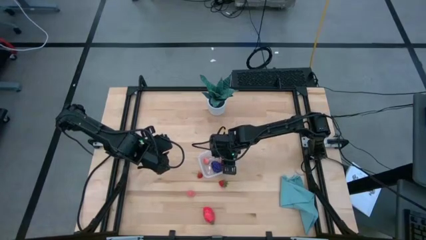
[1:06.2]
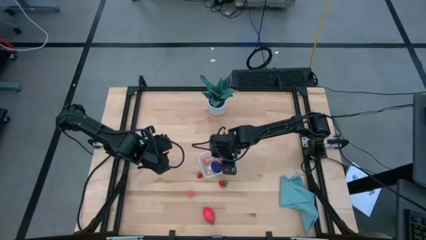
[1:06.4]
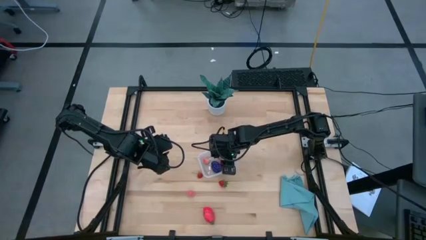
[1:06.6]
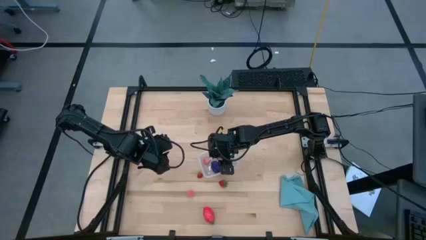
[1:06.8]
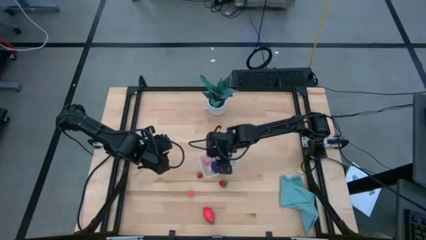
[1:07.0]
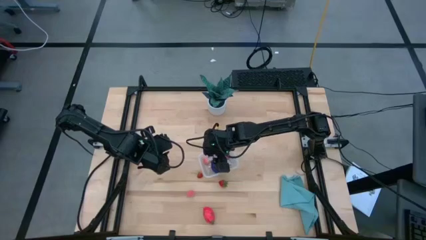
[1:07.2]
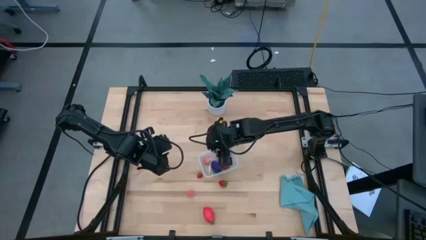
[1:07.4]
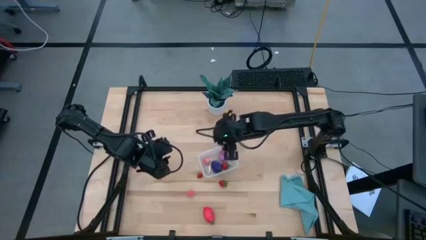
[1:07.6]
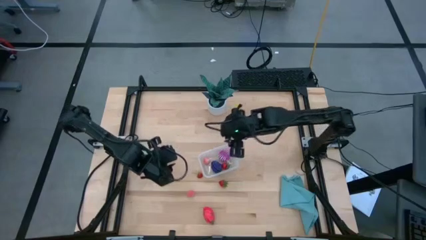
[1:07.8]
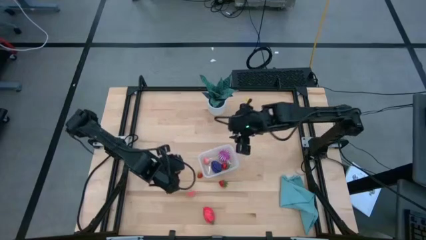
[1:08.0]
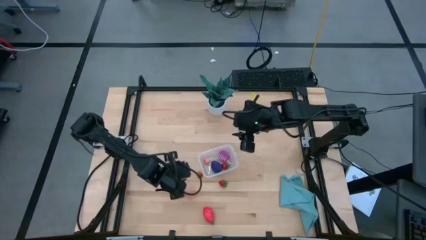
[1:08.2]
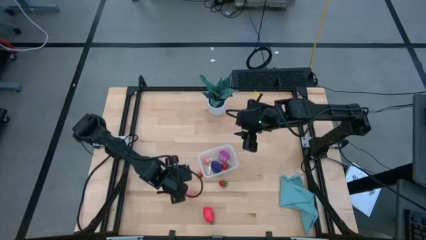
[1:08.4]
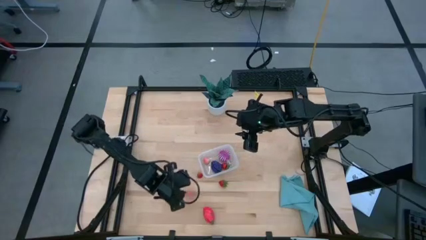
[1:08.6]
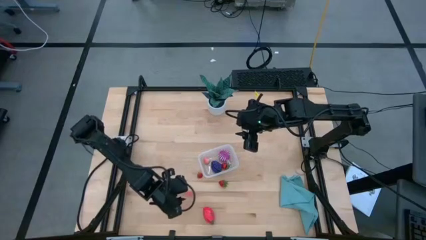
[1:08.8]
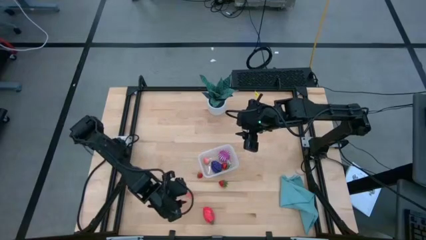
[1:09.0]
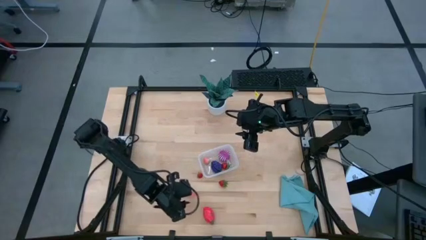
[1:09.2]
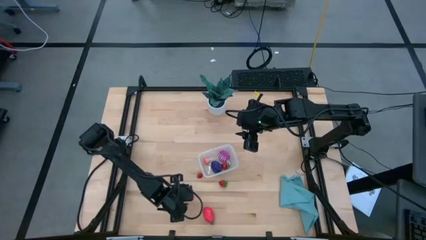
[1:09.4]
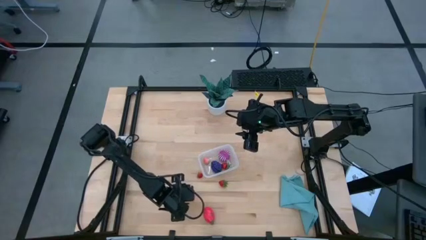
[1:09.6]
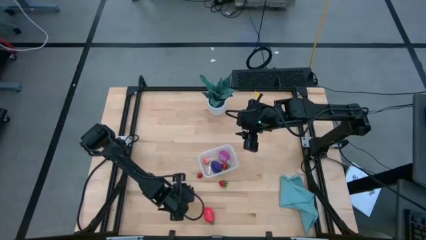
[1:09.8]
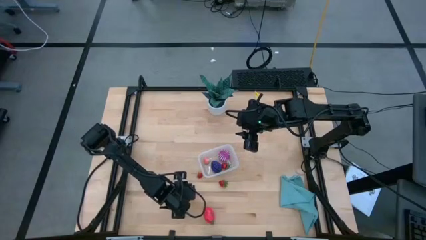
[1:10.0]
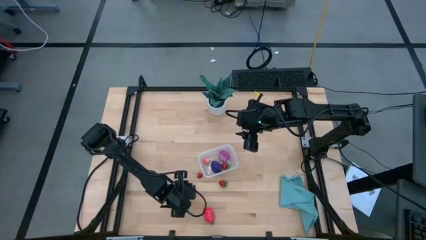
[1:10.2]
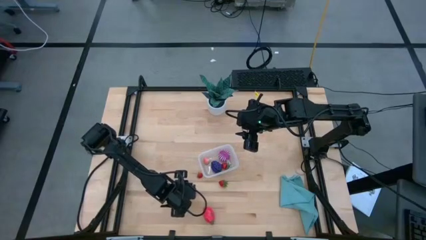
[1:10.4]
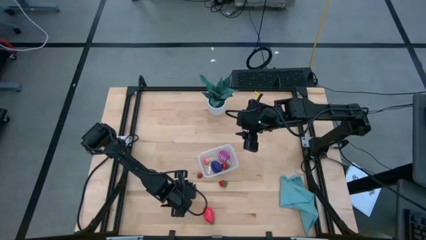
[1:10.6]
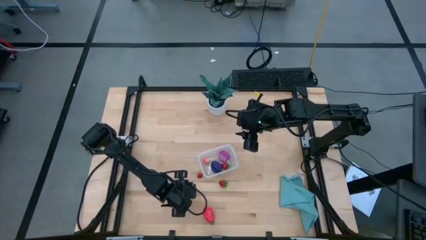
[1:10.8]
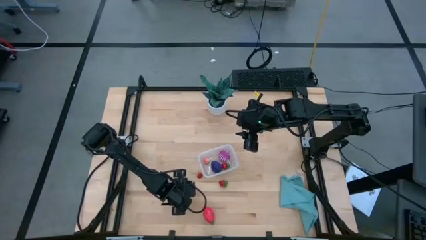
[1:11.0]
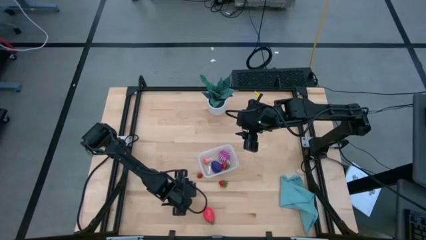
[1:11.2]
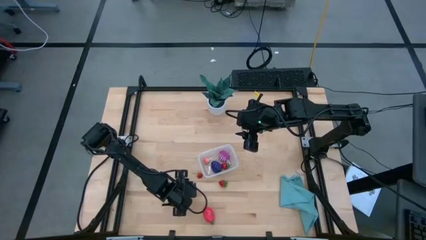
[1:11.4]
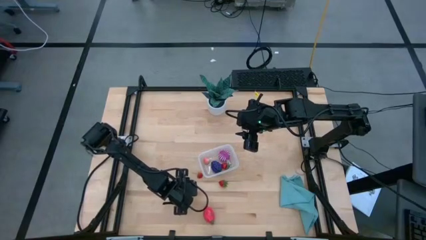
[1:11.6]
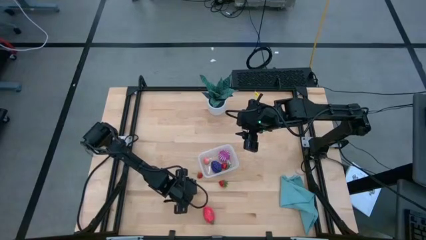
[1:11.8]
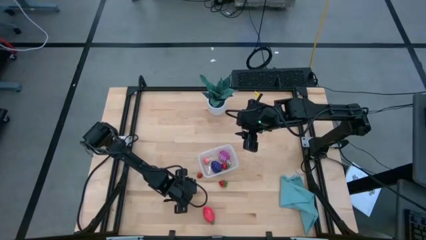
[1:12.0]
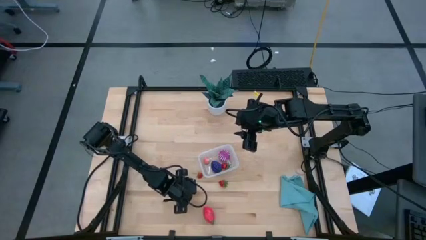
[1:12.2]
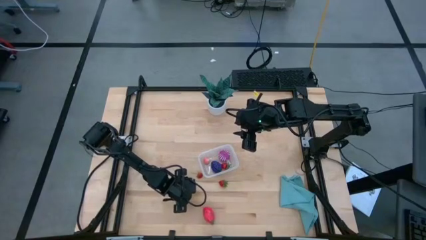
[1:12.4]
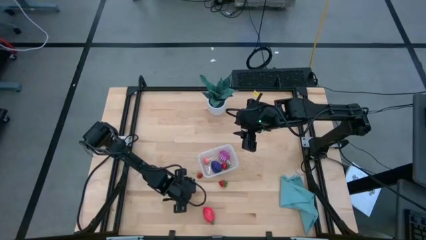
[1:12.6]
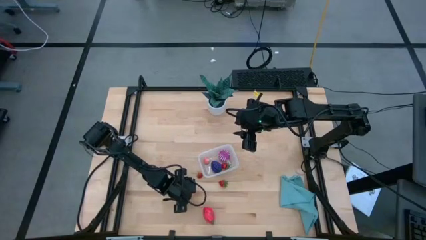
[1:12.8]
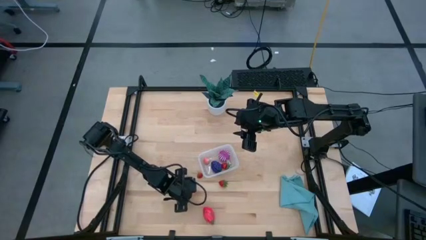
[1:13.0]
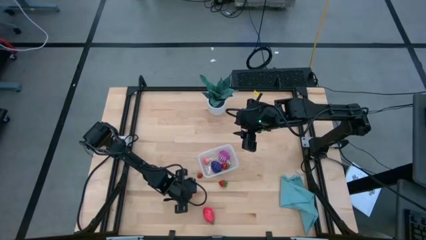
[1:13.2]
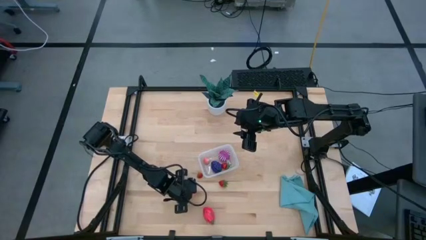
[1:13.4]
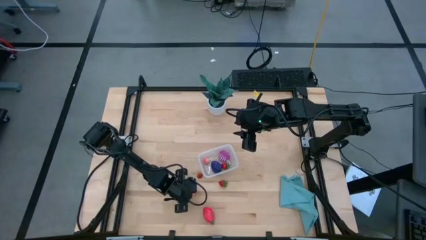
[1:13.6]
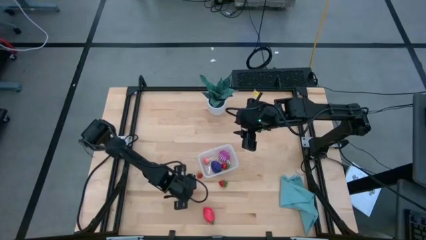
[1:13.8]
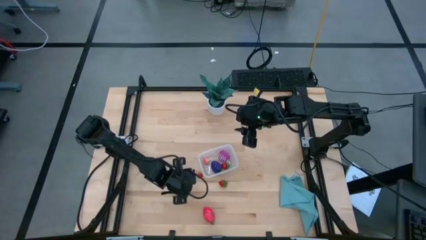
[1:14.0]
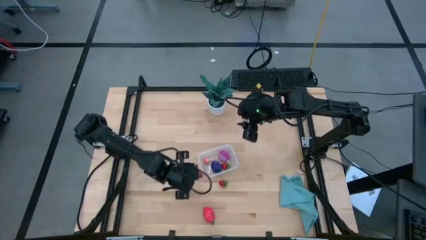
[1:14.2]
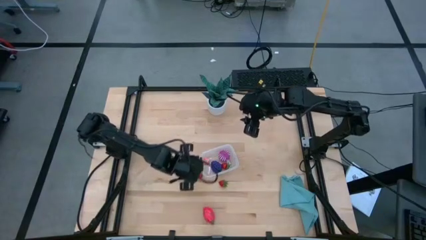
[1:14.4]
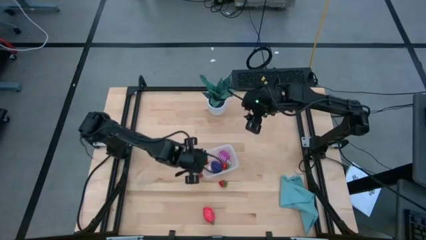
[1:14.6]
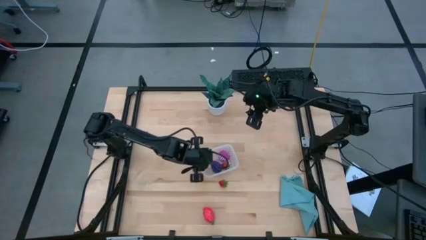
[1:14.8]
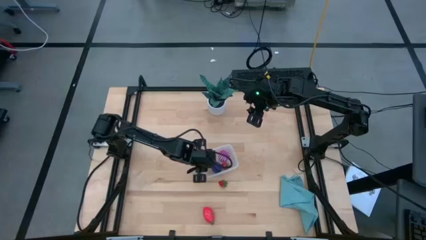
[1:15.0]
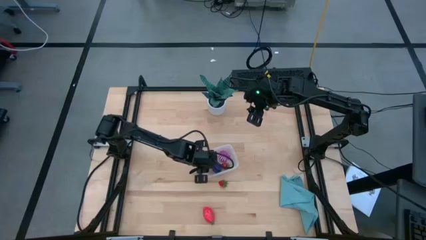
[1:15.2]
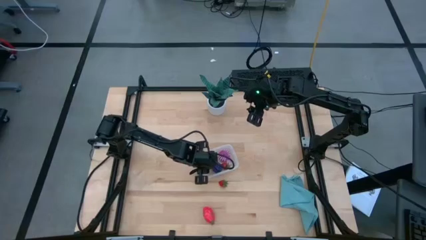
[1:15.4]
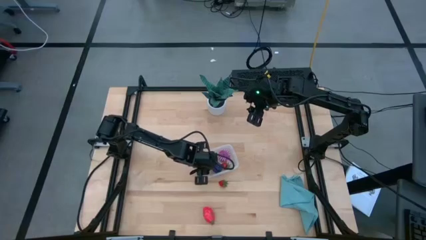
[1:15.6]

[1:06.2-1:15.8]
Task: Pick and placing Produce into tupperware
Put the peach into the transparent bin
